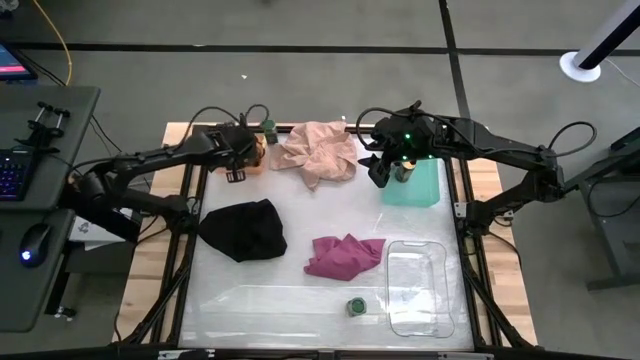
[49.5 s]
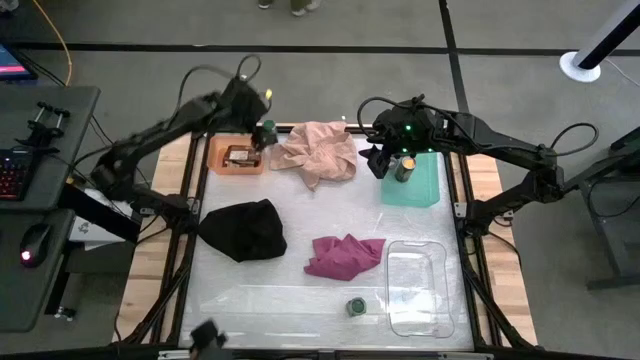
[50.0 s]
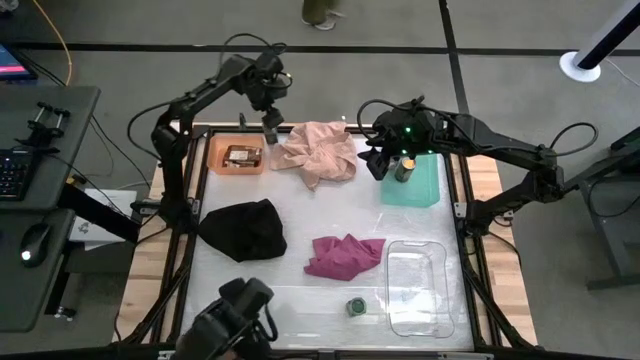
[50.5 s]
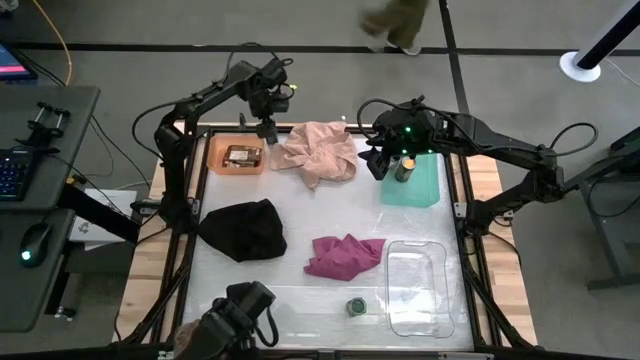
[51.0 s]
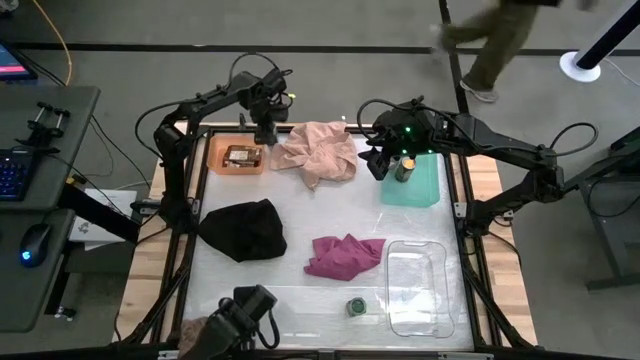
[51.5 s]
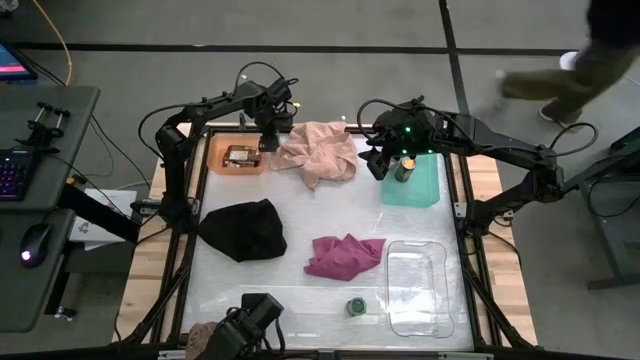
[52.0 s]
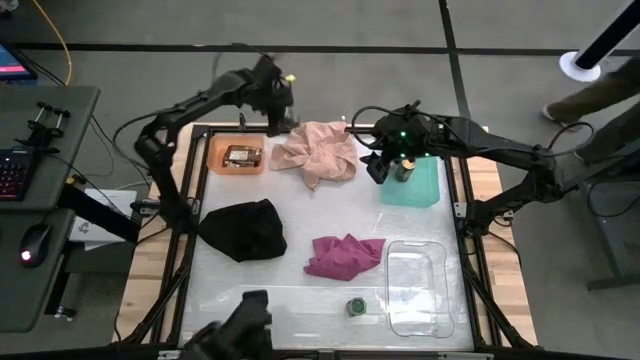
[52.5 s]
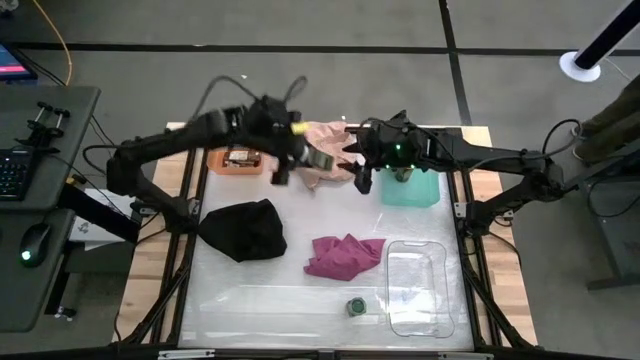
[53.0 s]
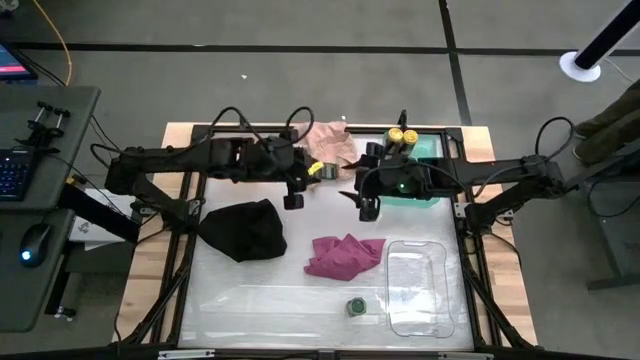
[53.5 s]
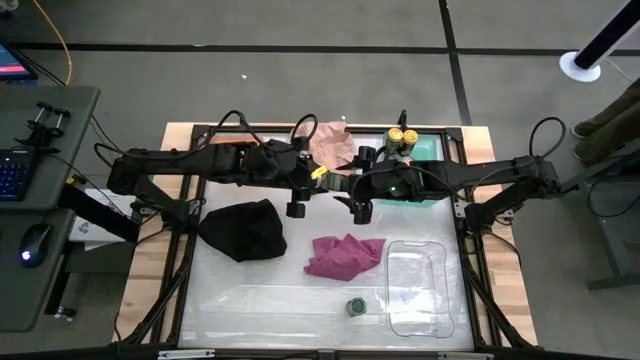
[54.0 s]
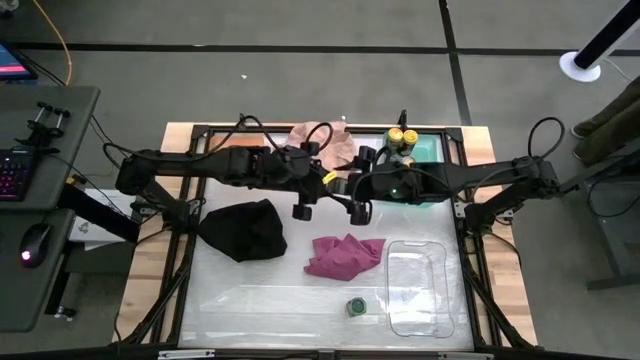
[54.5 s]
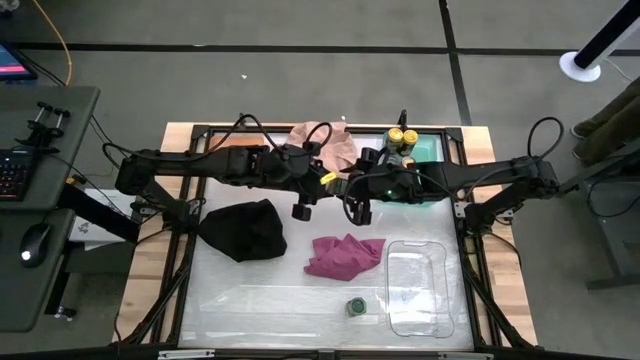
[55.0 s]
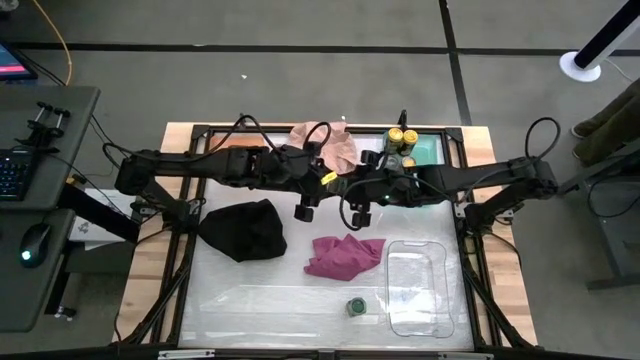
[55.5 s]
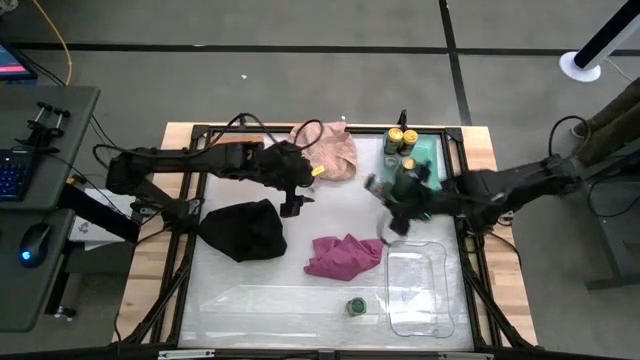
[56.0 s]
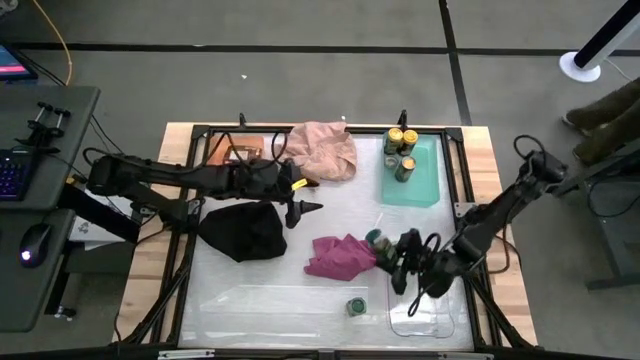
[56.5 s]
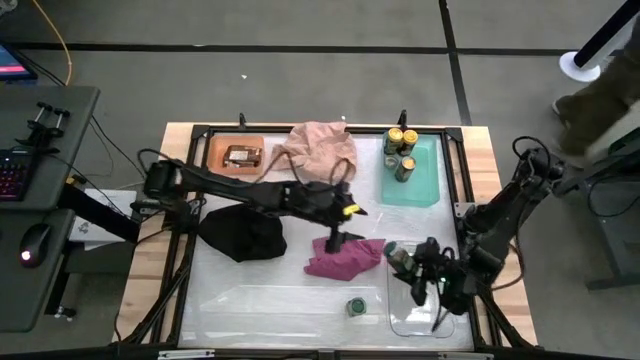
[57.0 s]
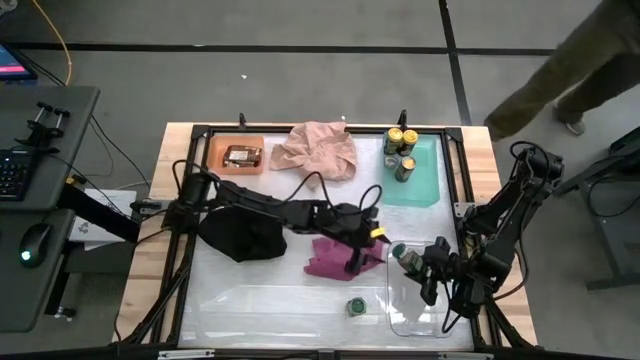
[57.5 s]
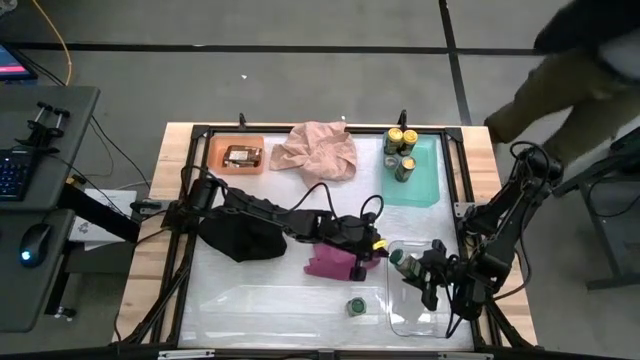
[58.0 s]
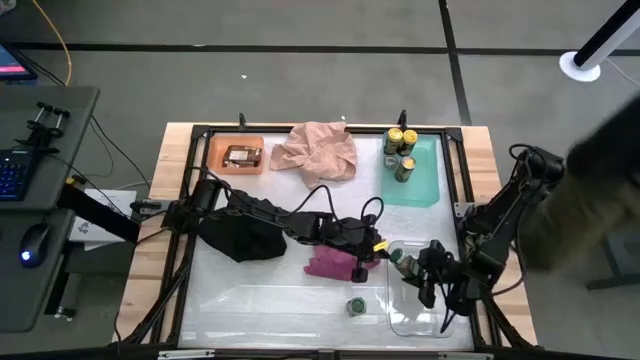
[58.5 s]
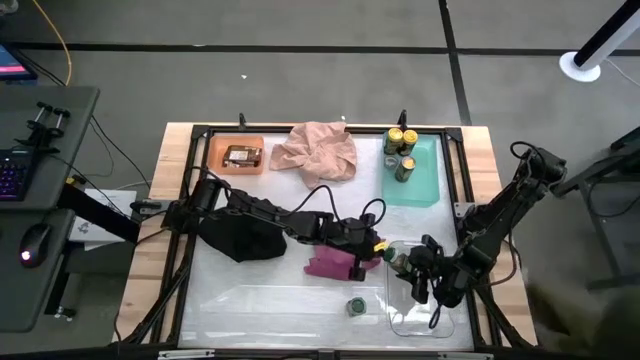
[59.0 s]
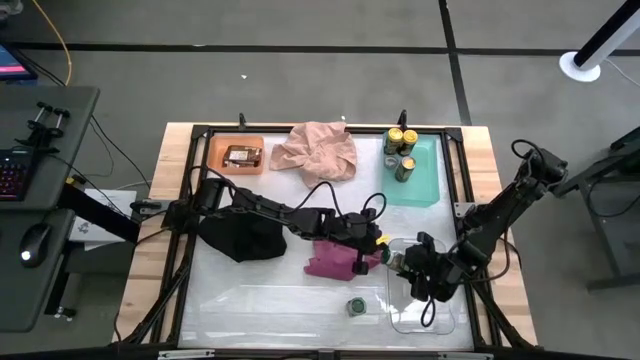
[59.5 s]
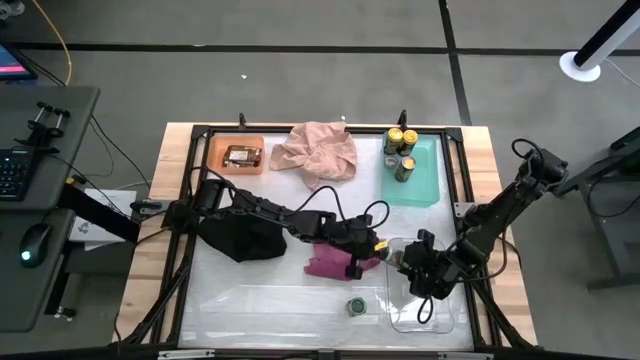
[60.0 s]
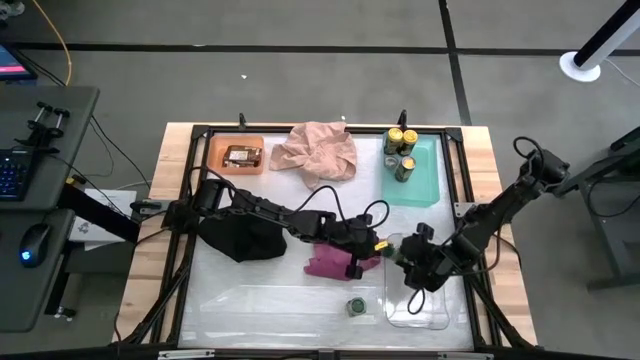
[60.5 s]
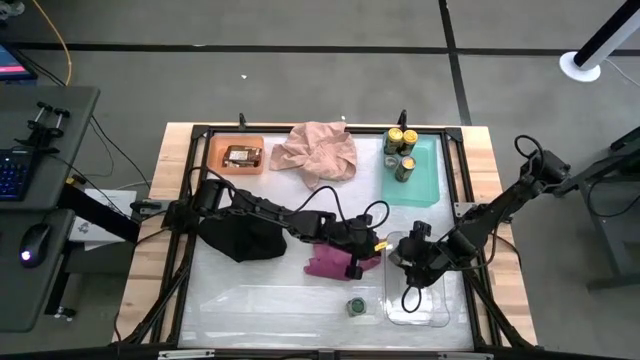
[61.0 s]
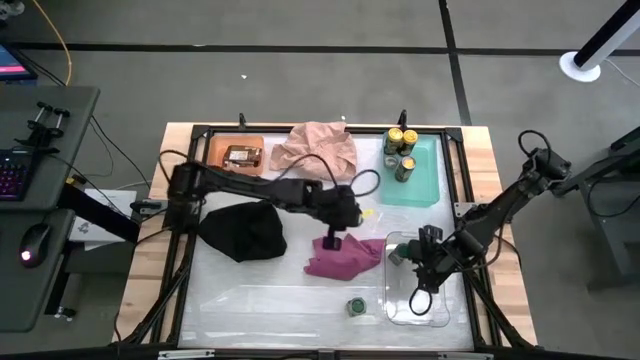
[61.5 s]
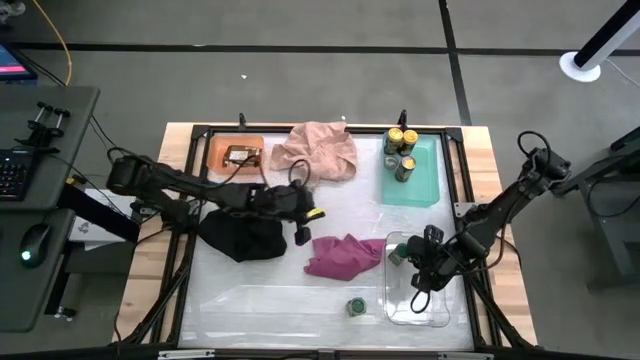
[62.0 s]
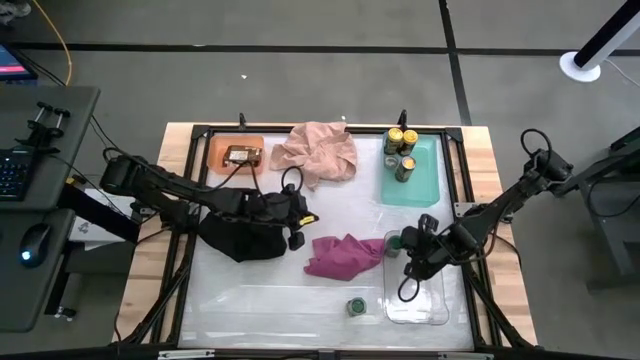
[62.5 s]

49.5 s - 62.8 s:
Task: Sort spices by type
Put the top green seasoning bottle into the transparent bin

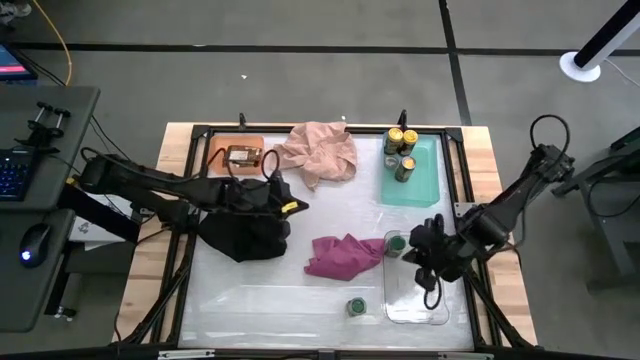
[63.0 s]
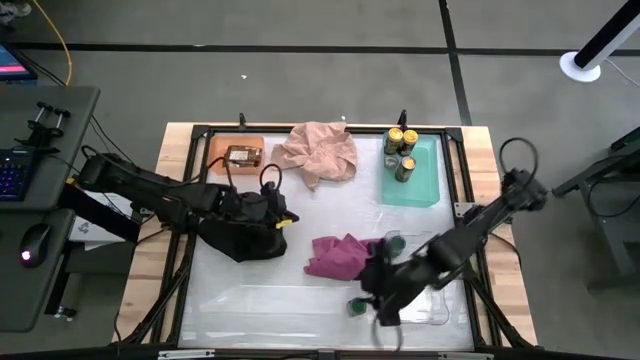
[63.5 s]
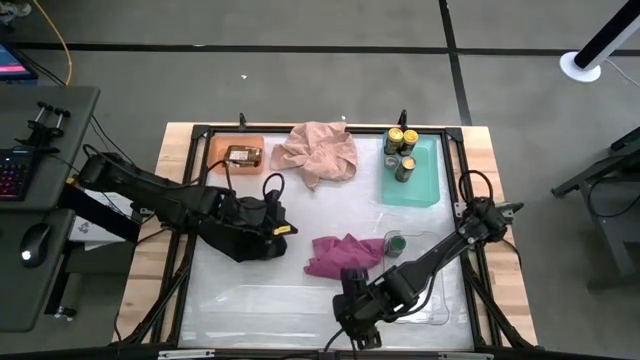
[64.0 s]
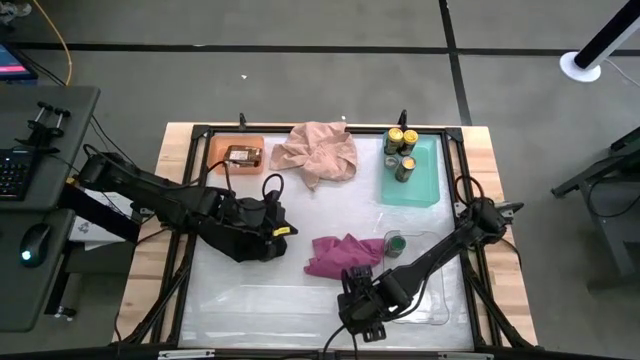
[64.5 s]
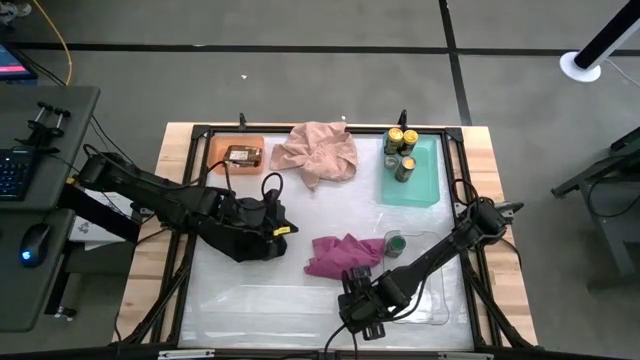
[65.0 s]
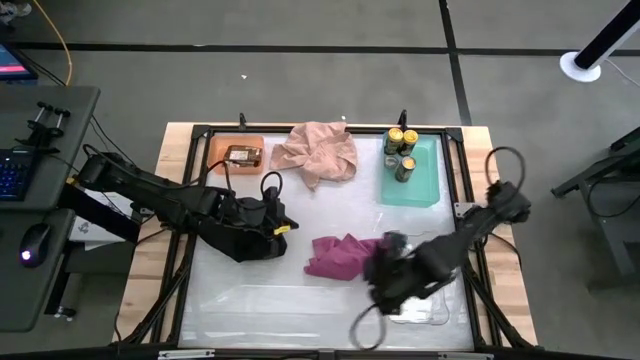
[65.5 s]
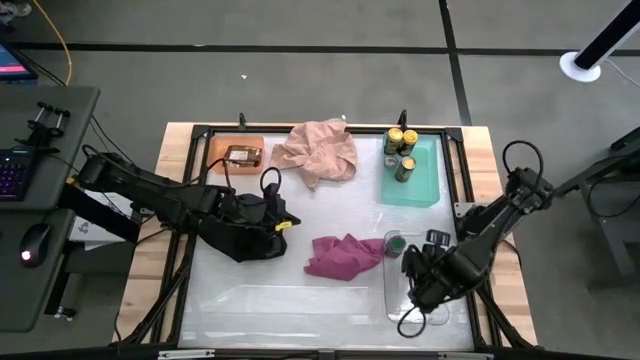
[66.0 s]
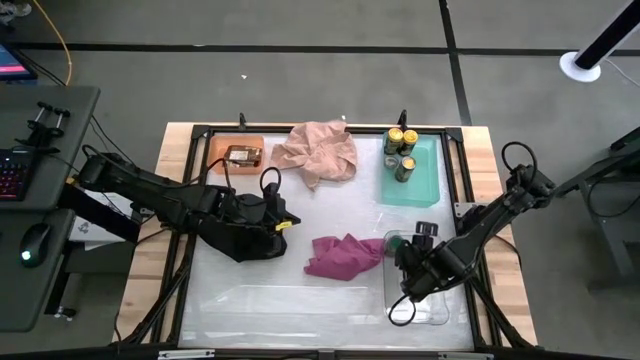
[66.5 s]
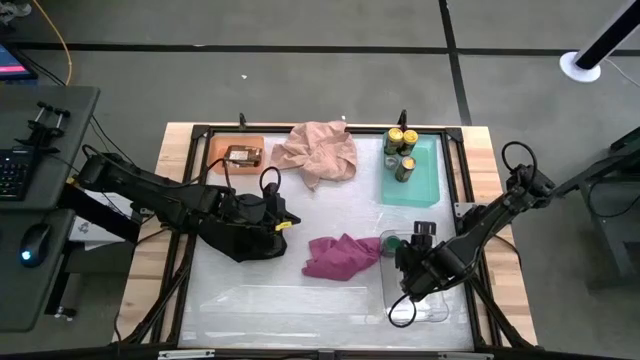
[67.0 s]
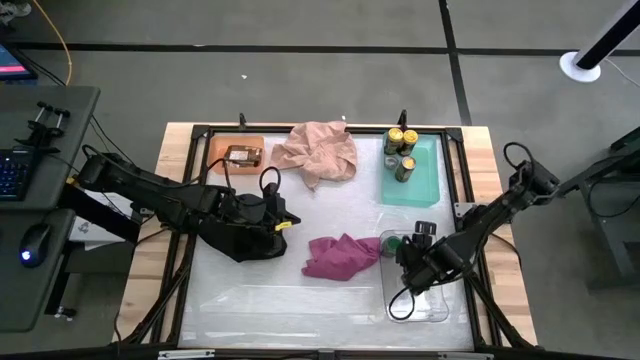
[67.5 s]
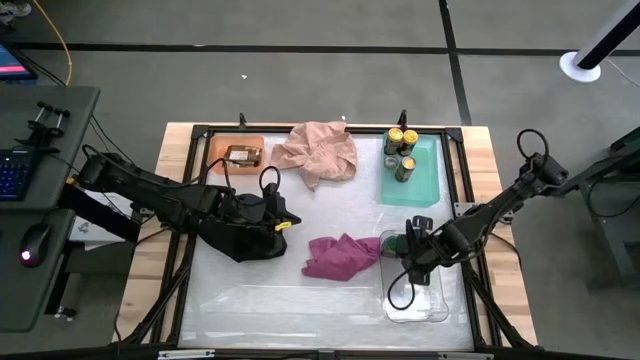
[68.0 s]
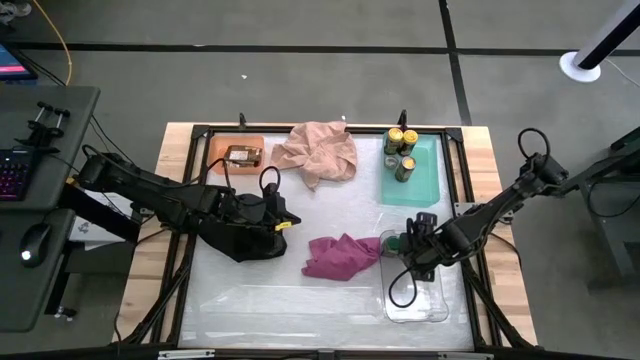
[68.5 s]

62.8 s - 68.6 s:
Put the green seasoning bottle into the transparent bin

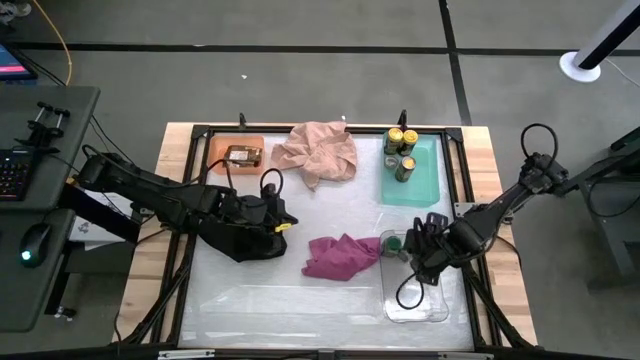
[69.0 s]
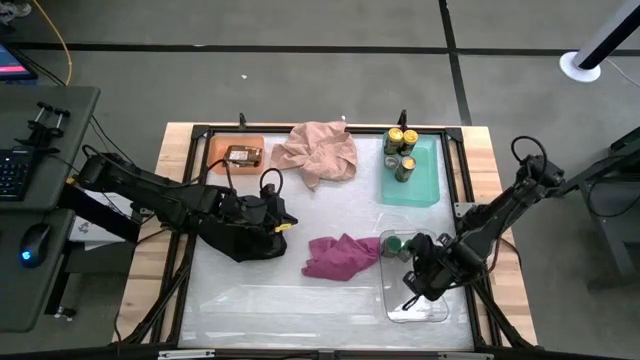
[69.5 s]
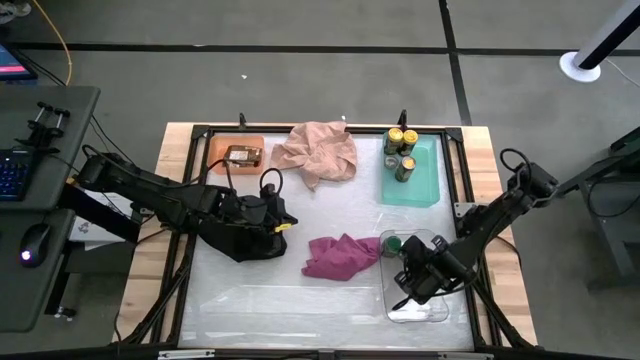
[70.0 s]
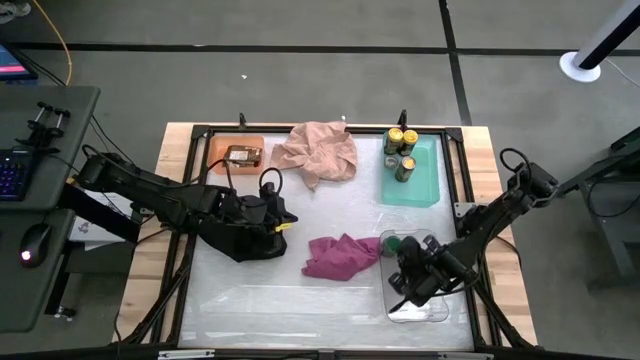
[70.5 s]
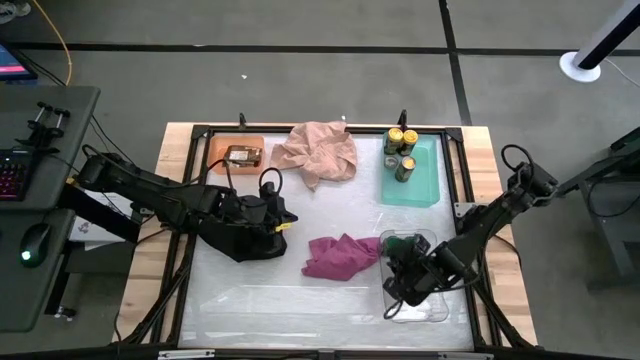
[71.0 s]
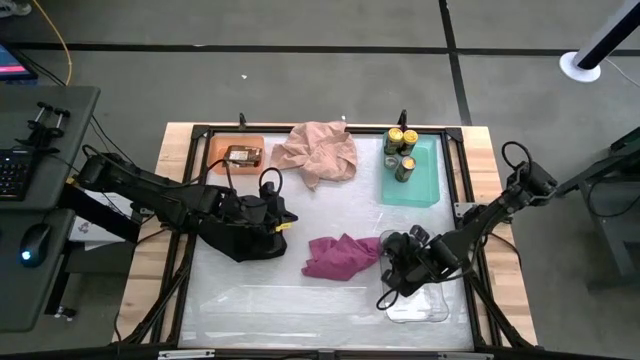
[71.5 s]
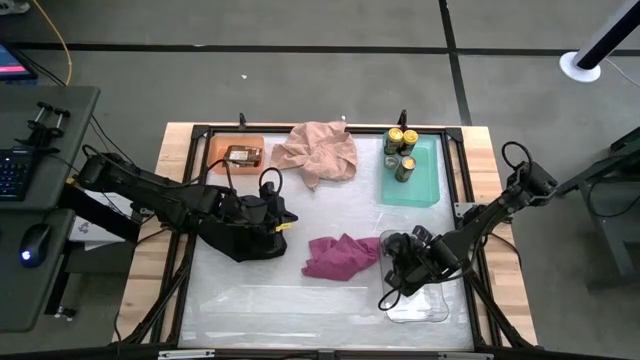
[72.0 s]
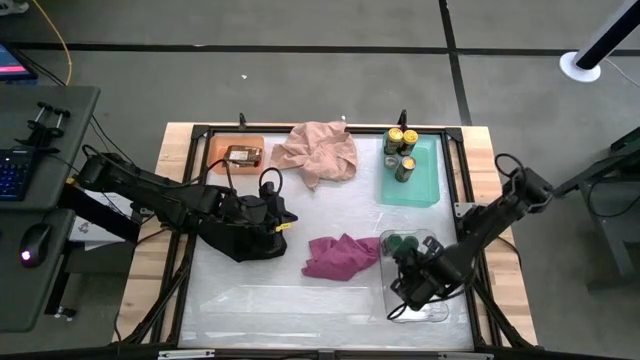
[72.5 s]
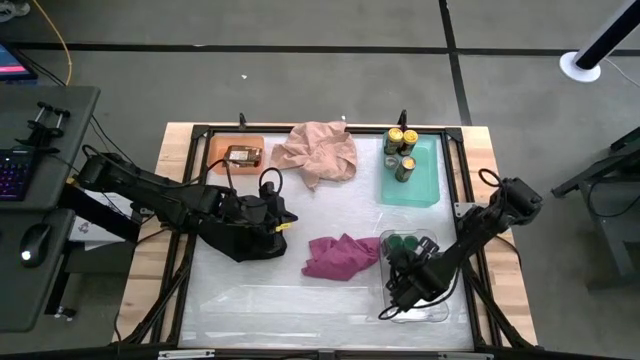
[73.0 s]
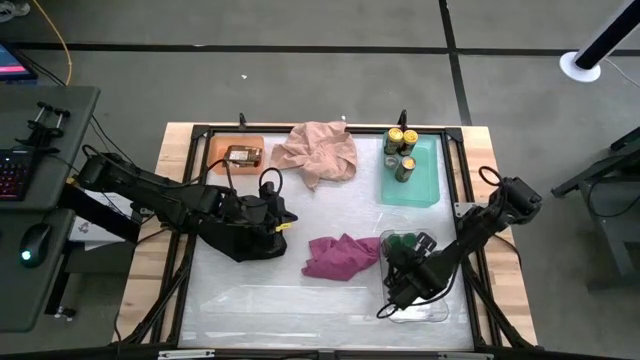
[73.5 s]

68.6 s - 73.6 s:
Adjust the green seasoning bottles
